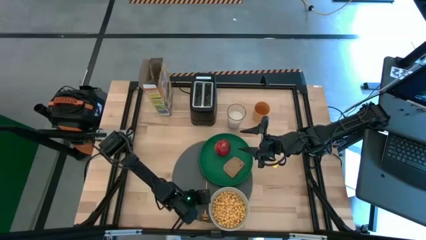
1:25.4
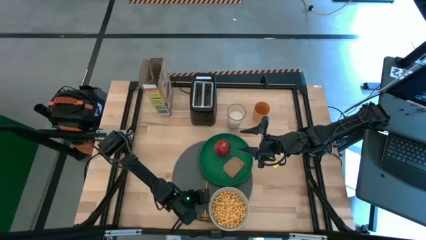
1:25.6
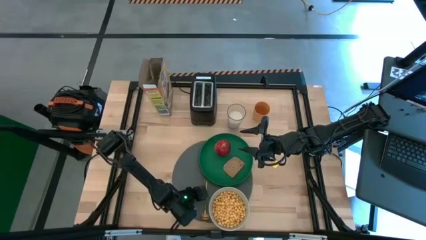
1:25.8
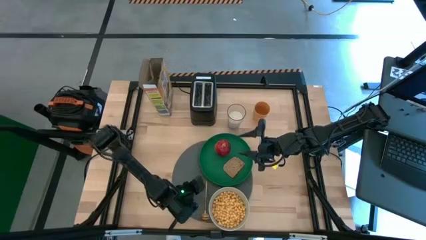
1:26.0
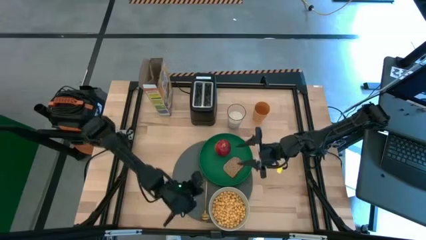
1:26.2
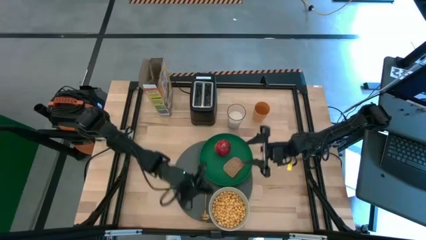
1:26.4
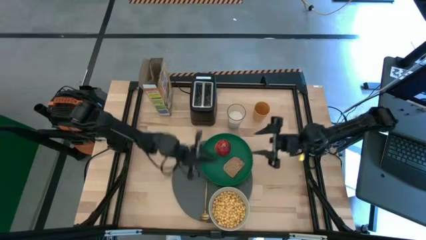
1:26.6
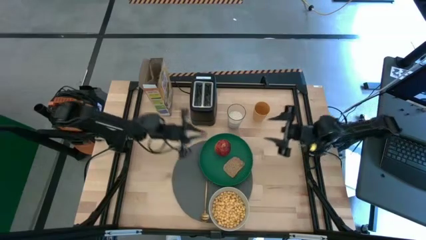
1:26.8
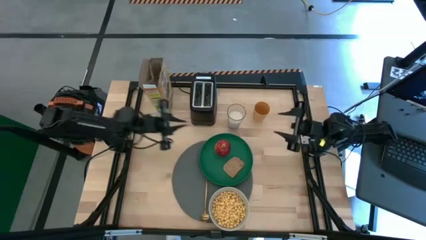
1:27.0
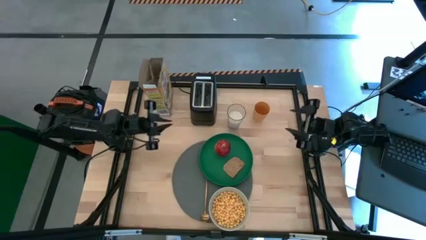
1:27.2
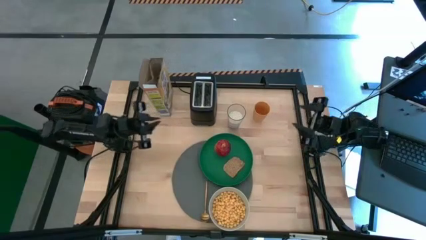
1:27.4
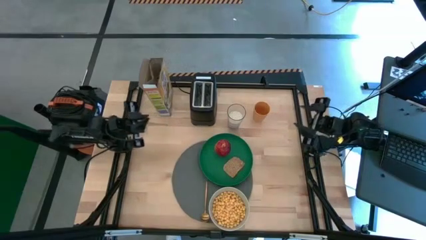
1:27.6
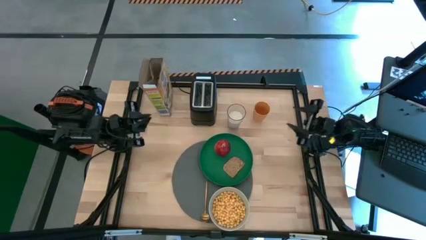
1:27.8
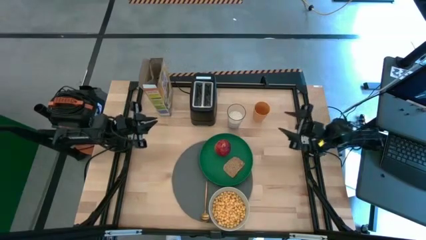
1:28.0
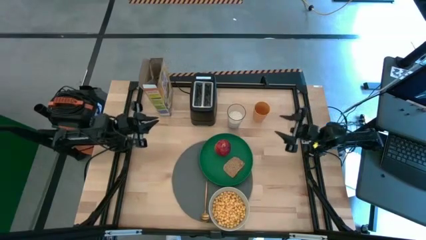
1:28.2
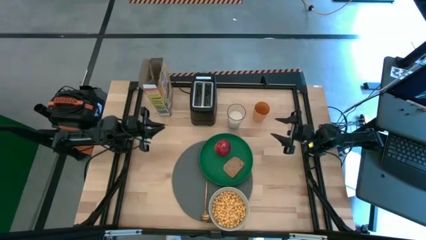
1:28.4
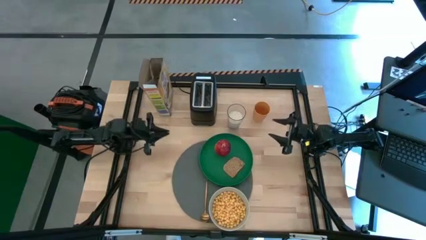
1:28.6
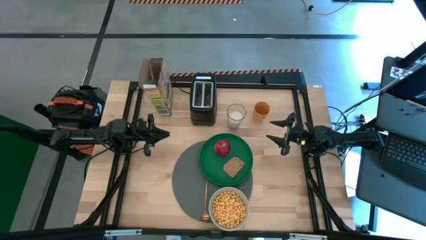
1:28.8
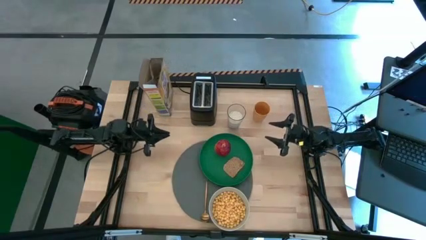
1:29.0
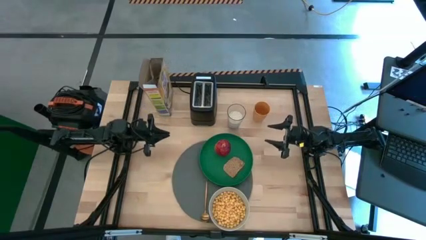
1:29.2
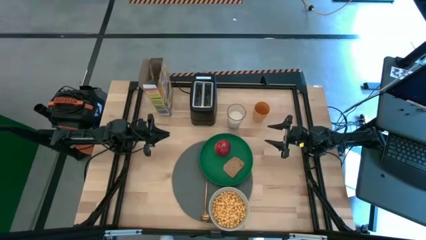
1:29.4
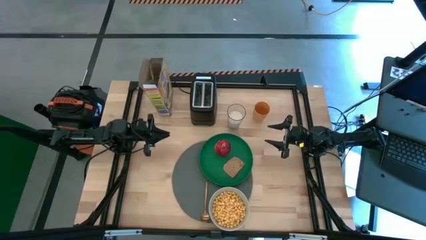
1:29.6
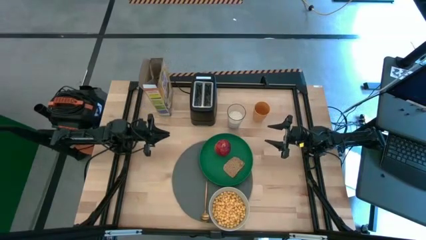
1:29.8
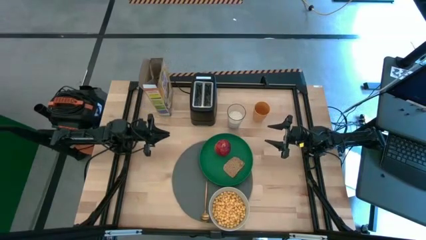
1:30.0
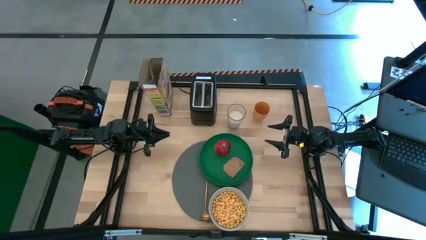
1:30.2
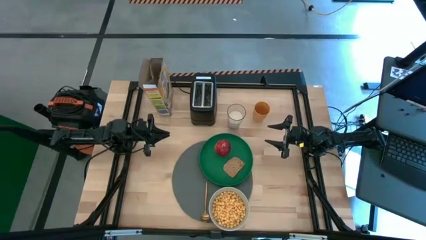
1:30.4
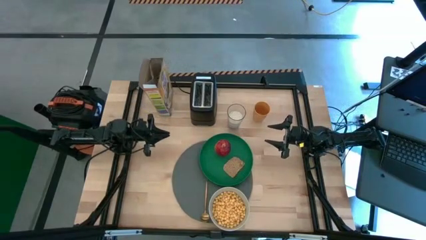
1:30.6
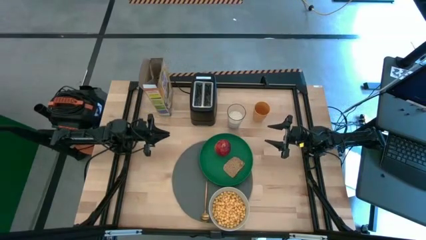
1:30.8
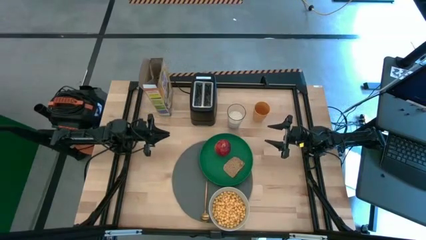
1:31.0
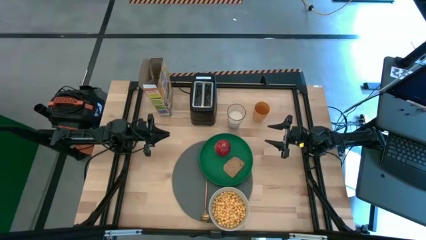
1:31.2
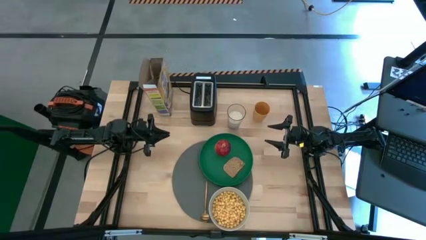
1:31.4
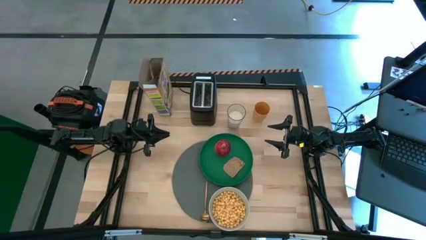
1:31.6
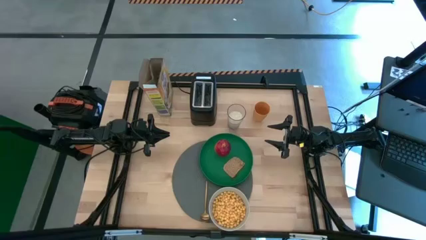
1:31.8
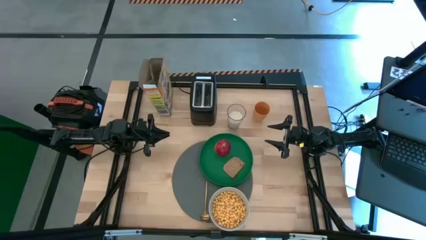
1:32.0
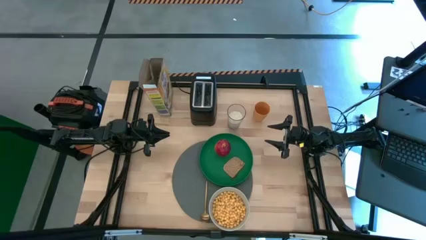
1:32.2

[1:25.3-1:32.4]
Task: Arrange a breakfast setting
Return to Home Position

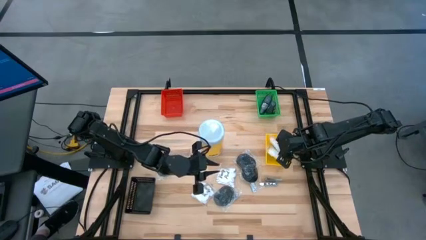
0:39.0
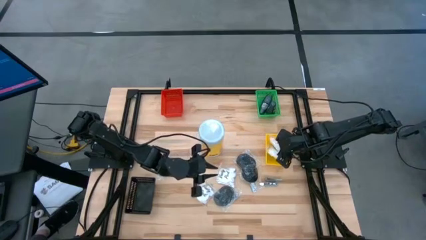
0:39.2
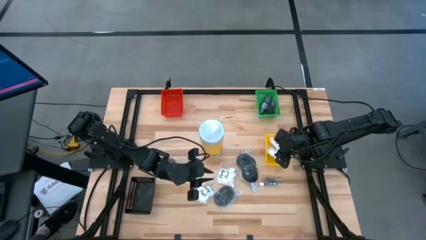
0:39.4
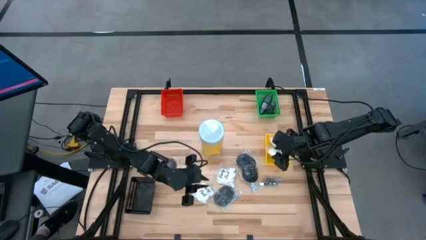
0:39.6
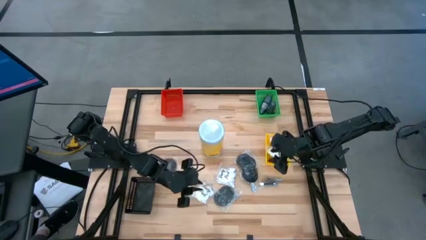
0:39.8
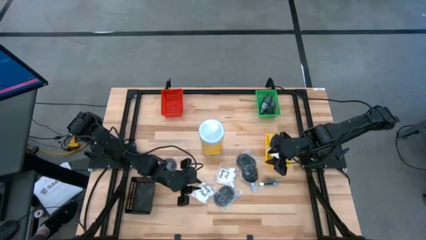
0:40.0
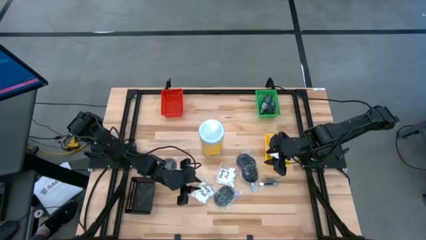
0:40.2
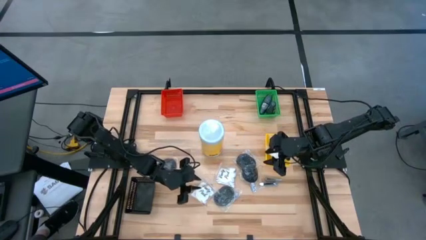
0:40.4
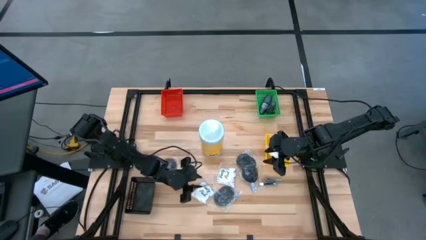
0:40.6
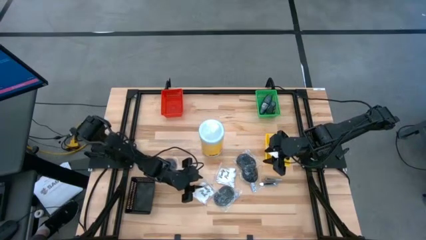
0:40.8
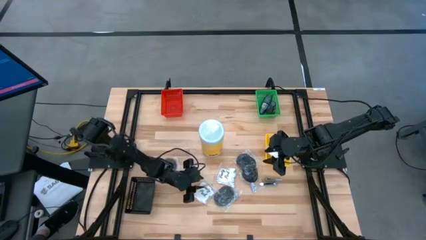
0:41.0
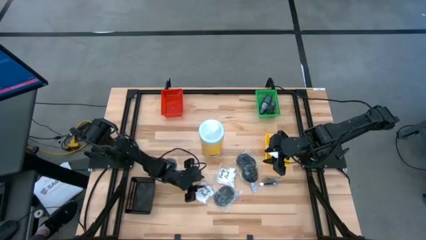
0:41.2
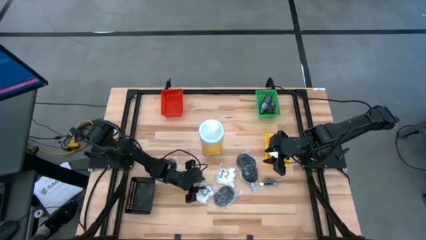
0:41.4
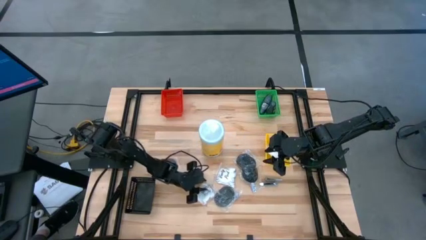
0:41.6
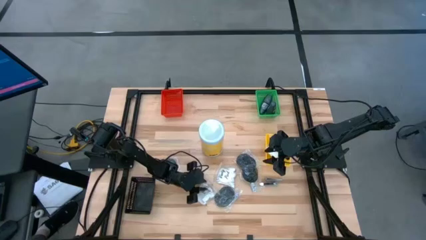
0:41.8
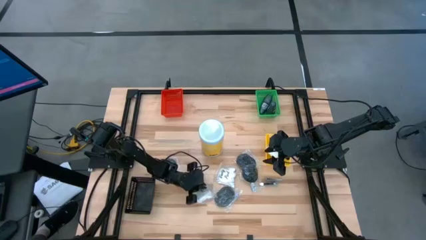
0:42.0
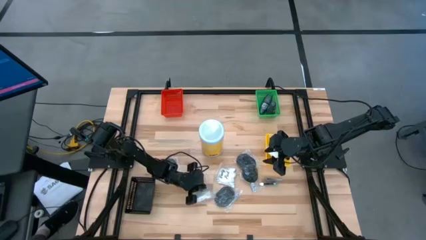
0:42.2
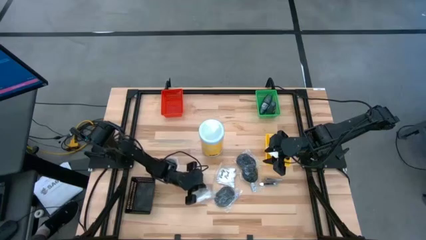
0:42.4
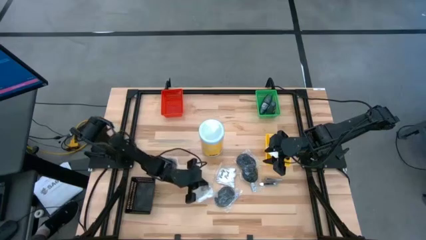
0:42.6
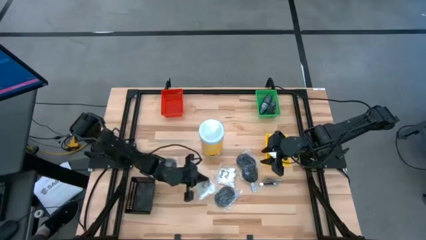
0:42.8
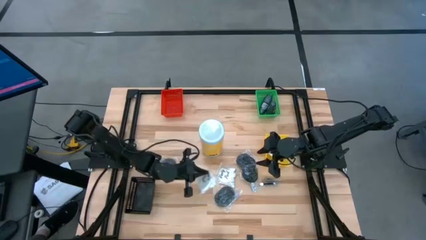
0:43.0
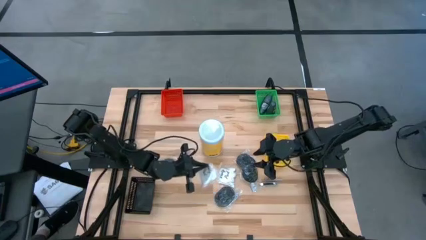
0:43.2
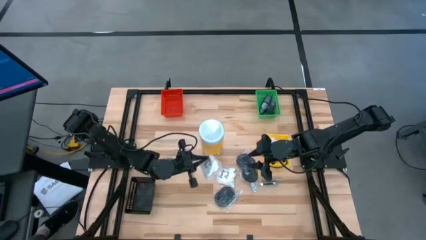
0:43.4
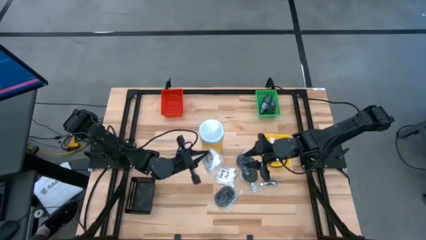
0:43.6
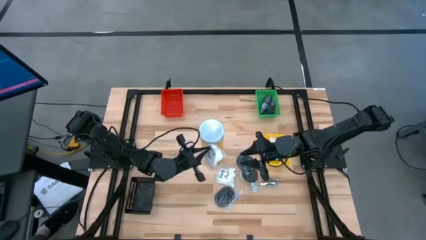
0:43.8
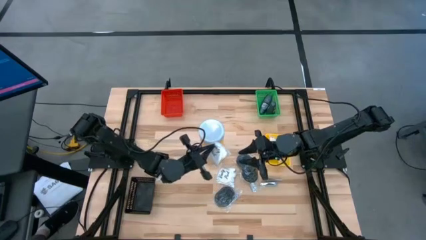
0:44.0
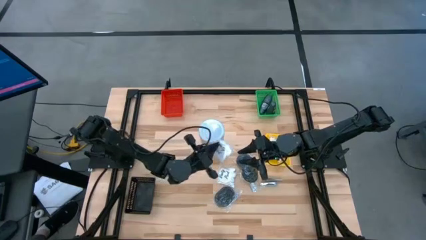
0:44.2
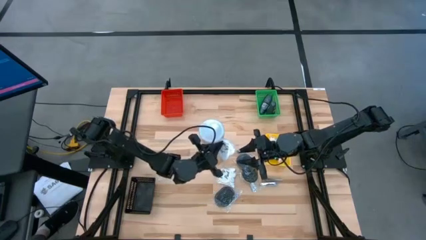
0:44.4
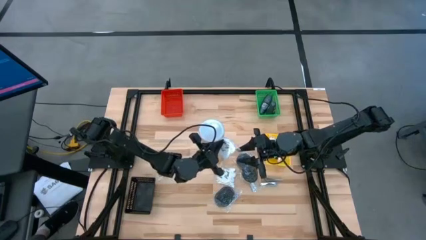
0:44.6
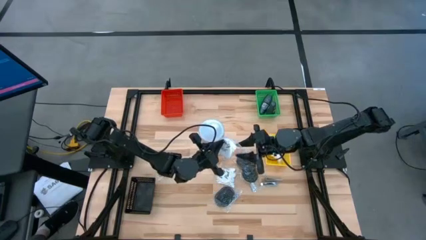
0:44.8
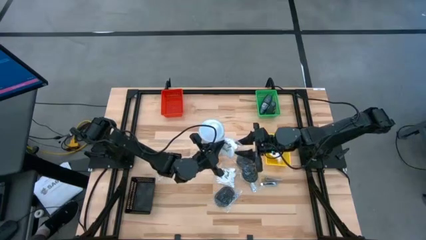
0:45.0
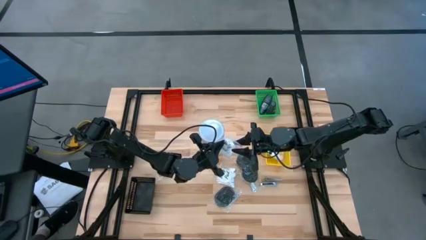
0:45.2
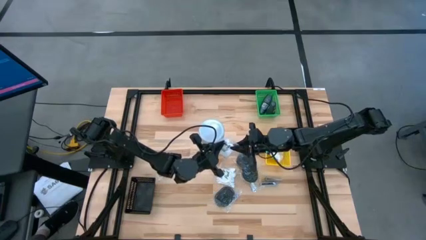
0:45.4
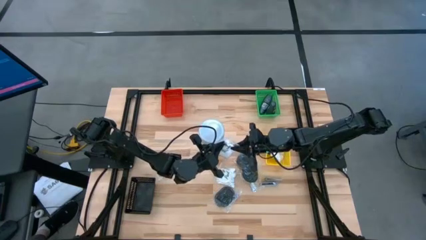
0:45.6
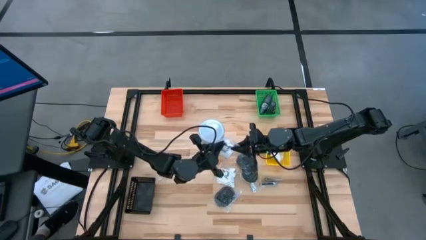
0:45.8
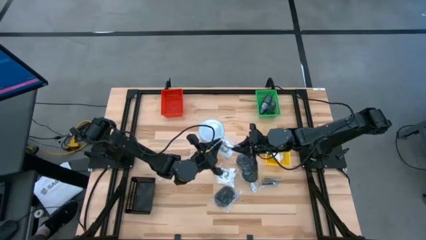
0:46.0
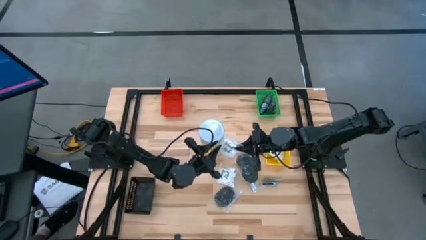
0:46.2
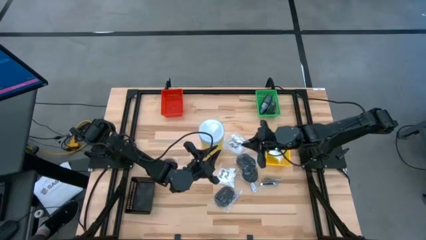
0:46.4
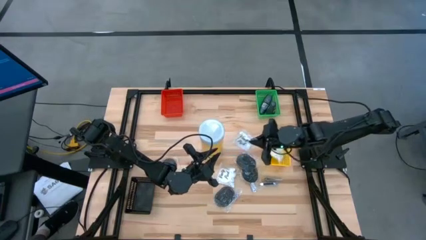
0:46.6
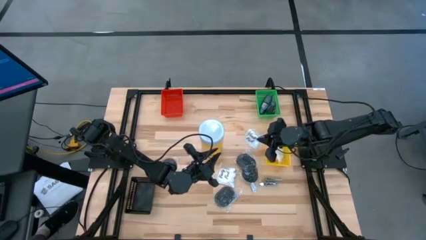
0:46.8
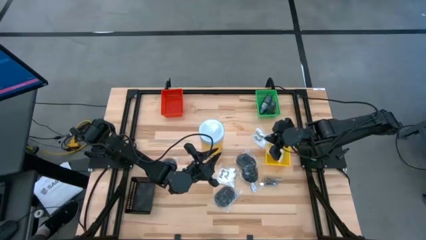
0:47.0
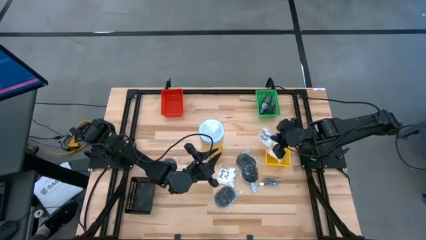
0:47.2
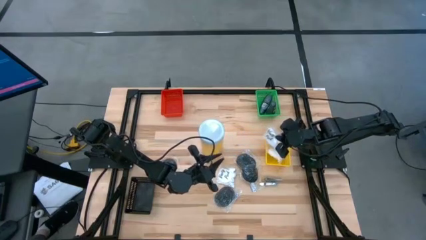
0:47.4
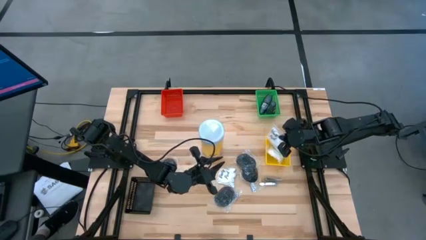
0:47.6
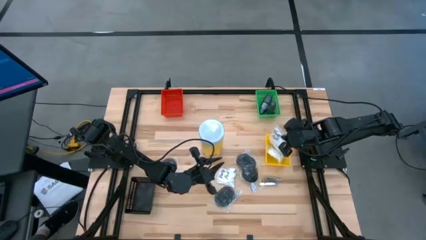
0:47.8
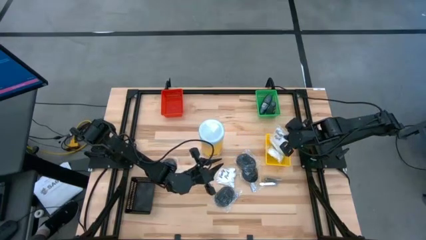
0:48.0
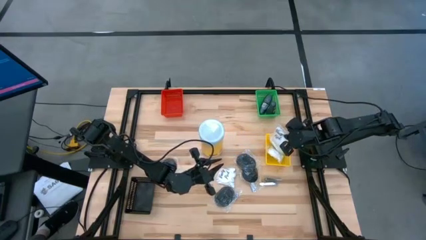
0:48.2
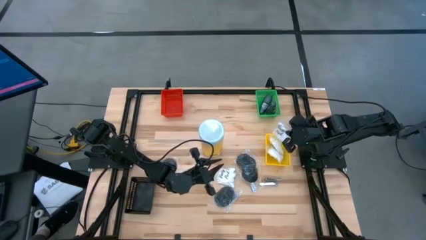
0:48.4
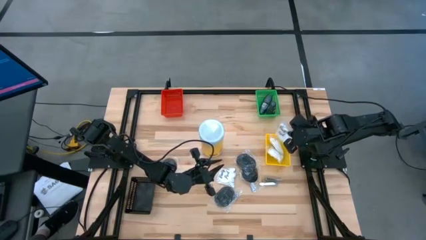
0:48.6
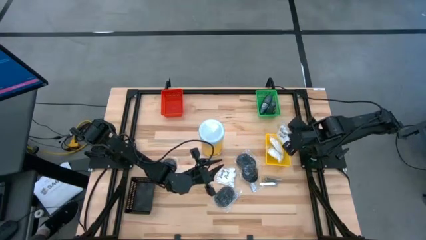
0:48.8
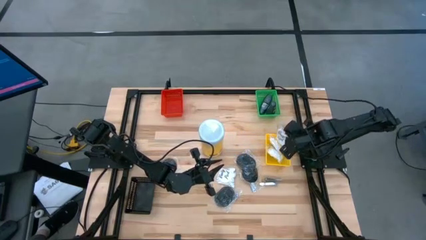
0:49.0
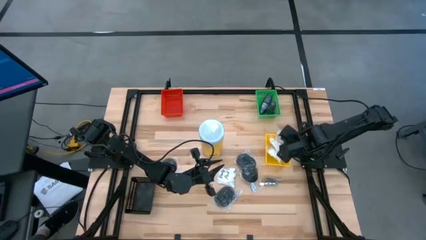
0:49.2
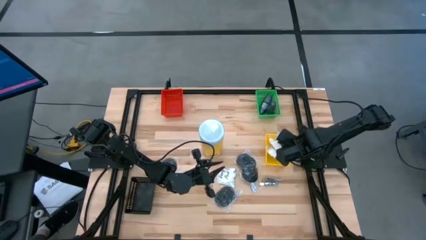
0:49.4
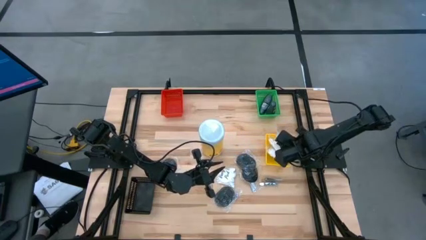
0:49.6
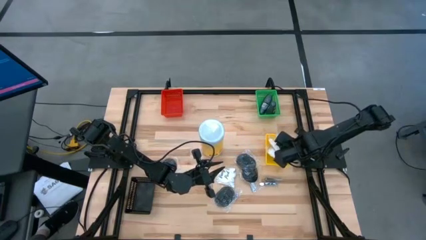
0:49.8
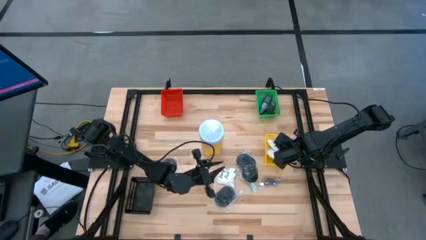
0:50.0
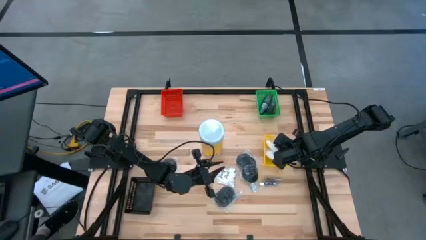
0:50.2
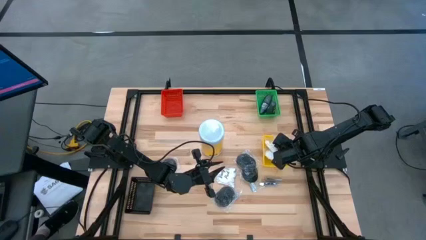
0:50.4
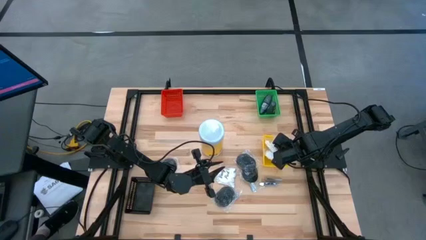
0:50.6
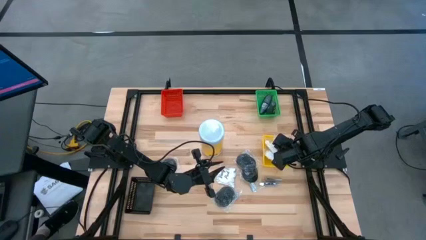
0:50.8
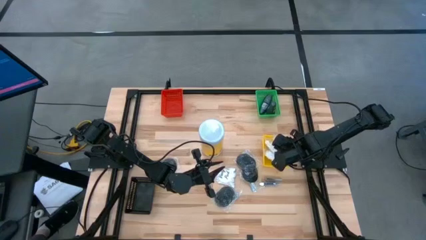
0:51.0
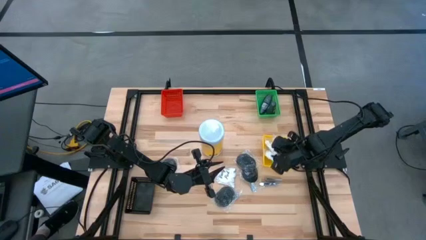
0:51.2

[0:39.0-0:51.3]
Task: Pick & Place Travel size toiletries
Put the white cotton pack into the yellow bin
